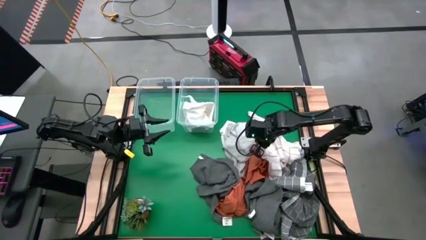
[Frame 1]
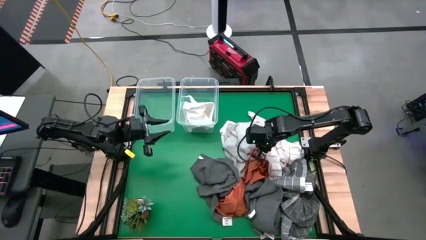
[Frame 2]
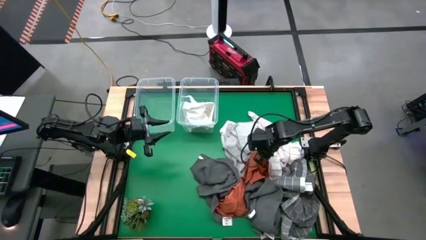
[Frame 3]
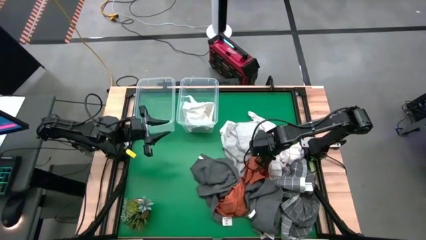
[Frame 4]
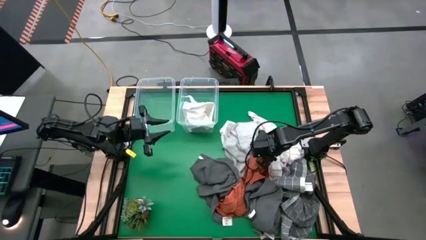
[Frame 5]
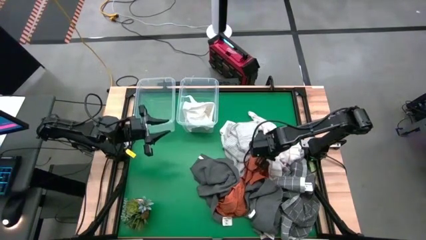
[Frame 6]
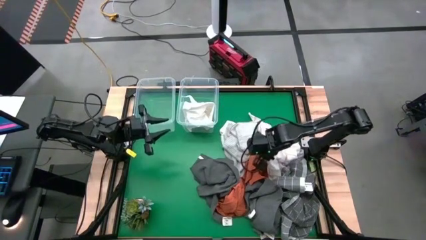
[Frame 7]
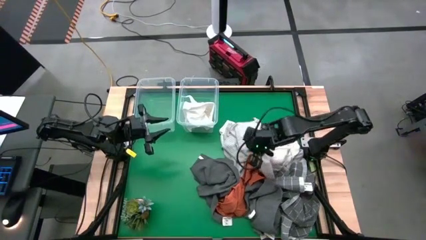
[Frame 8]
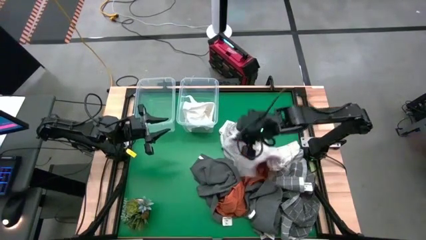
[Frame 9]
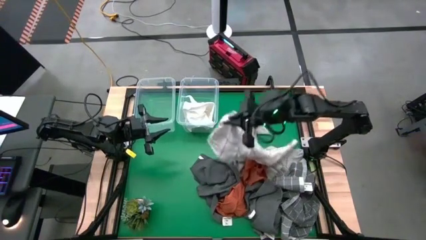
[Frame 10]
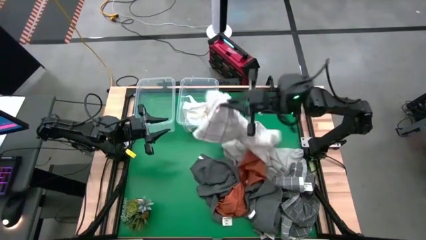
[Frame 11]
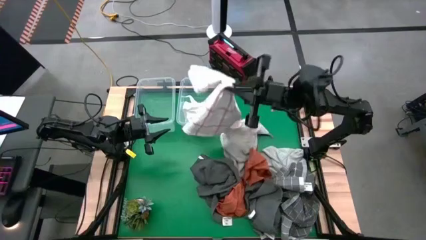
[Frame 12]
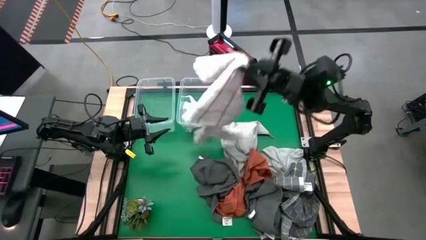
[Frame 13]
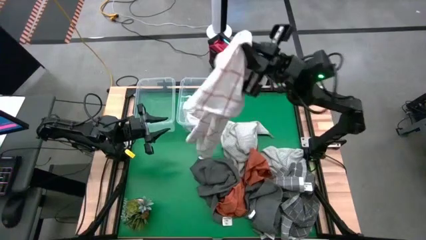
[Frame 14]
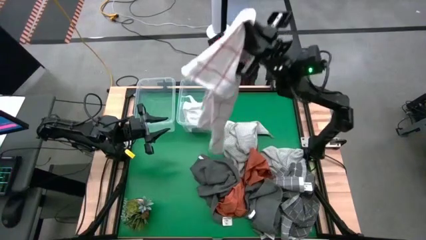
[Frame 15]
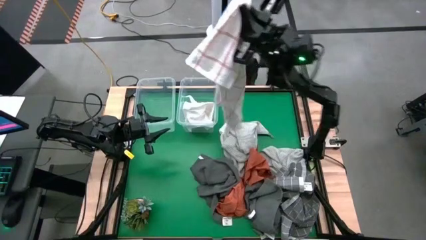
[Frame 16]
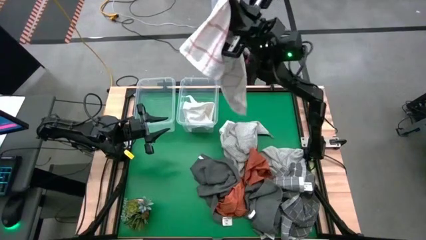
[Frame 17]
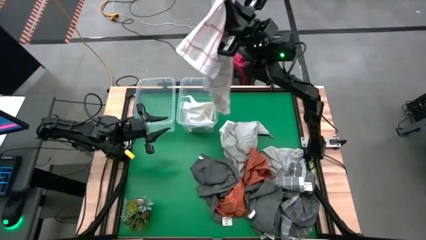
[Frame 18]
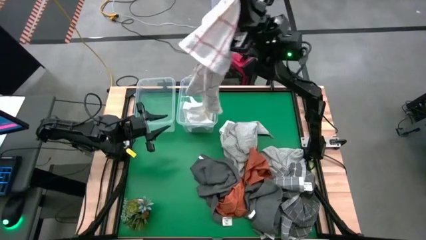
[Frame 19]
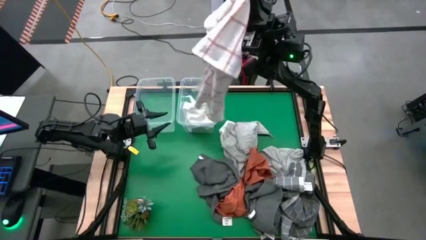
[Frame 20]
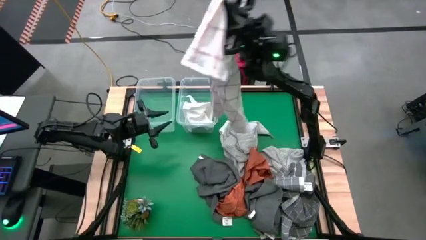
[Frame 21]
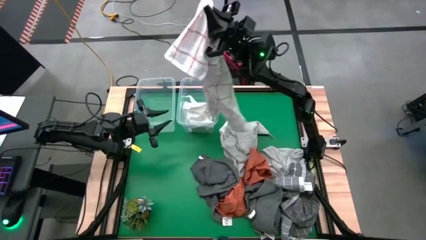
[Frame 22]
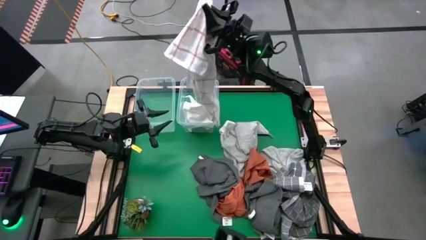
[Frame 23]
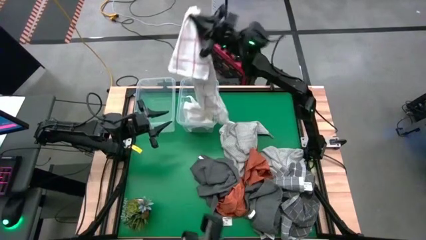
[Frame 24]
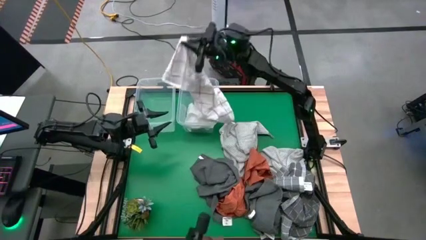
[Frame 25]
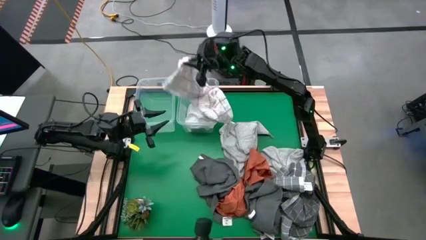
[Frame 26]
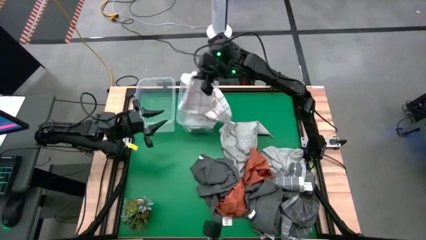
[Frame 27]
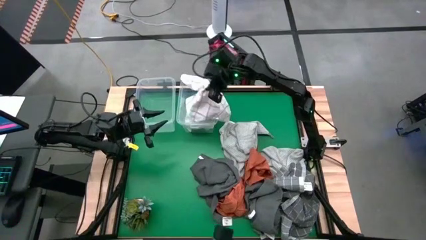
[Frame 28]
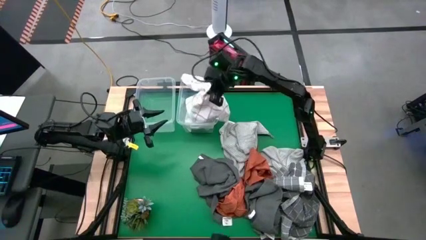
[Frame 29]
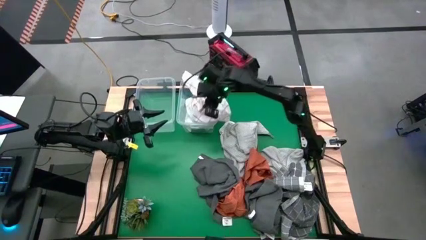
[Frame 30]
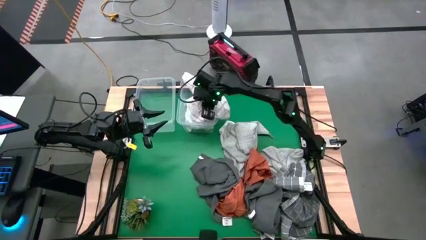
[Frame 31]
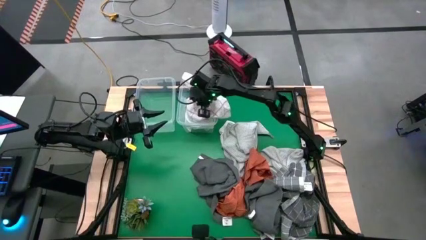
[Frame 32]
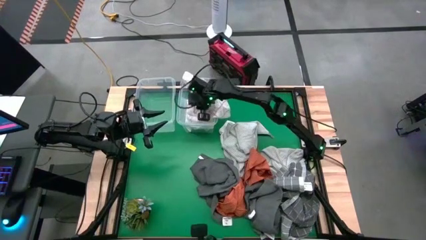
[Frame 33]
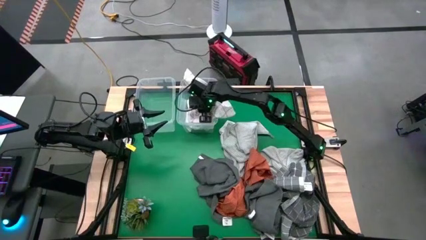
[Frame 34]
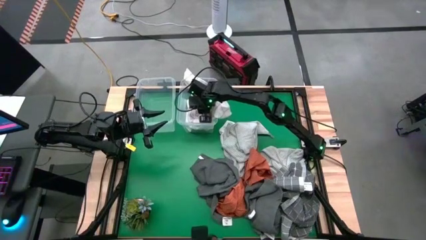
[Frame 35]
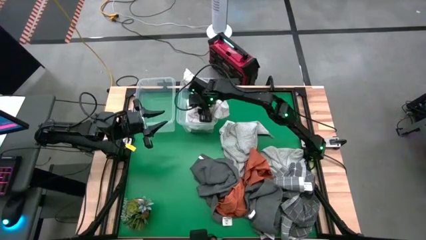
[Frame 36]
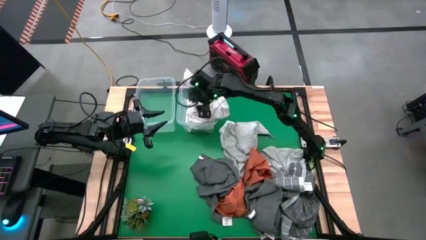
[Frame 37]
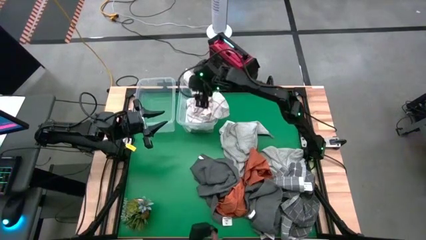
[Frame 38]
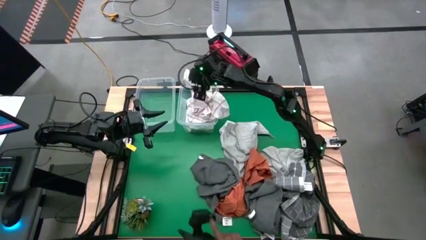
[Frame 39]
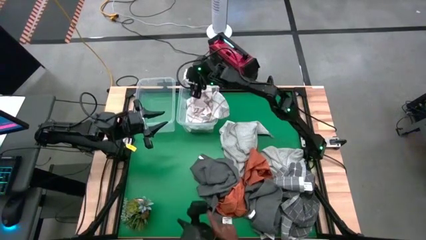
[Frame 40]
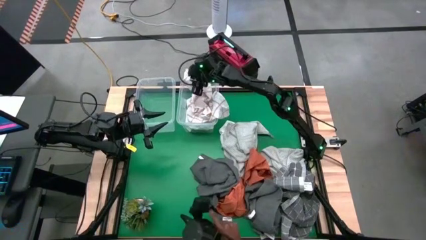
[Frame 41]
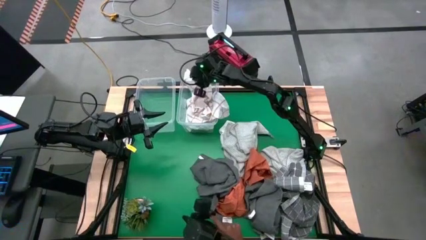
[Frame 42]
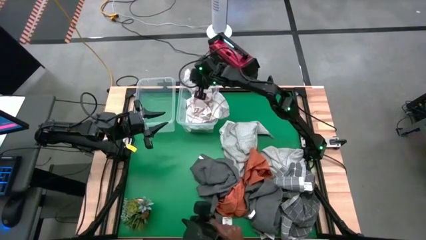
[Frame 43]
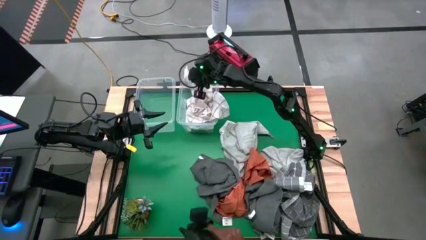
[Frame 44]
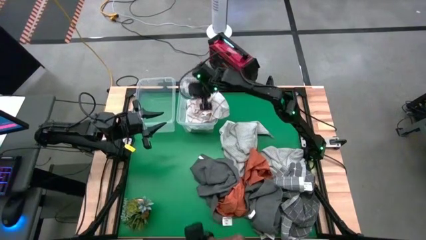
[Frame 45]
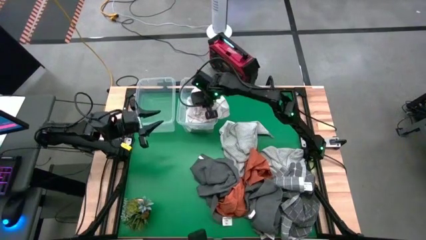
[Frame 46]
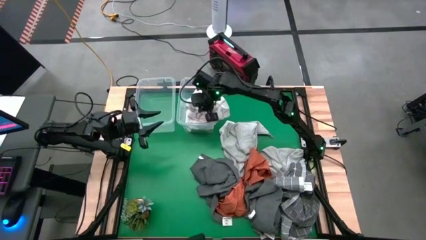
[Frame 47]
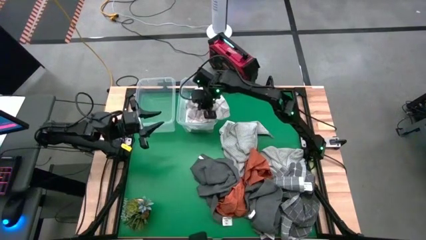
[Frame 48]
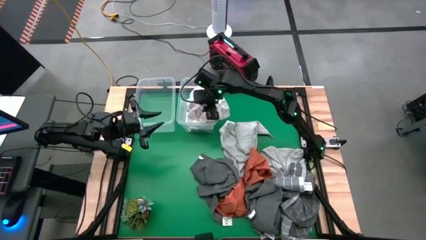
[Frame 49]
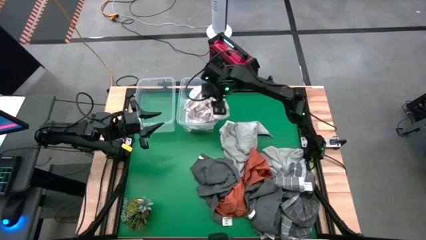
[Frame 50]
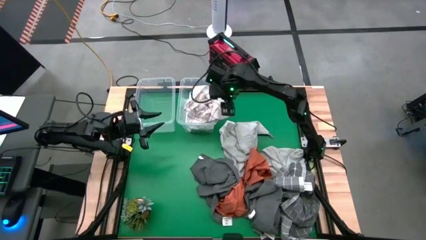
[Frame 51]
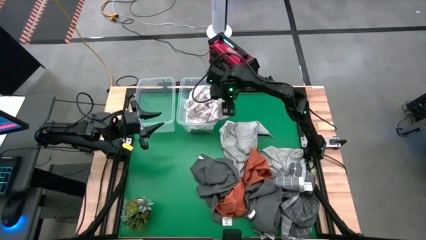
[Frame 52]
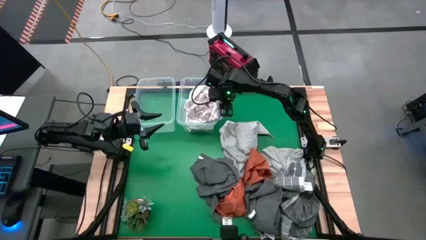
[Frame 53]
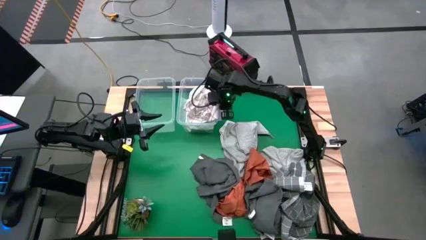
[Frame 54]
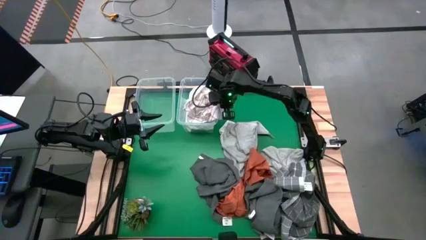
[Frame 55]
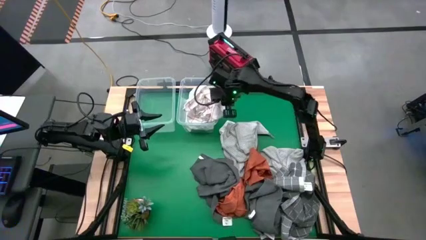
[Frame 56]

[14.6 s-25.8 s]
Task: Sort towels by color in basket
Put the white towel into the right transparent bin
